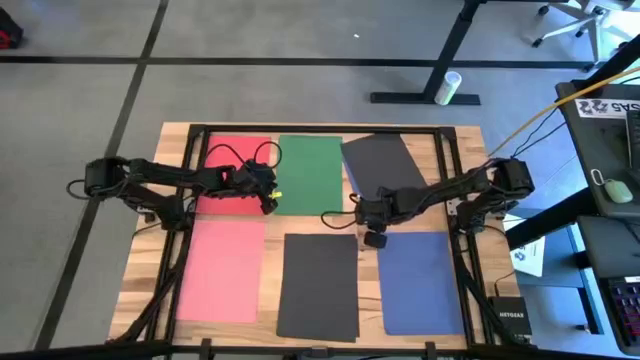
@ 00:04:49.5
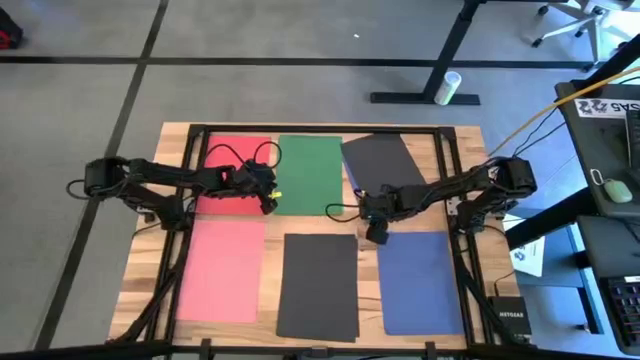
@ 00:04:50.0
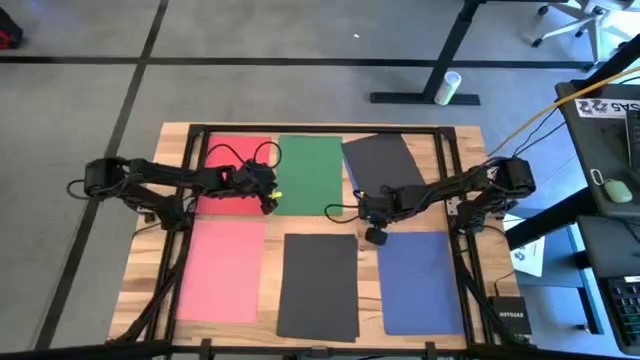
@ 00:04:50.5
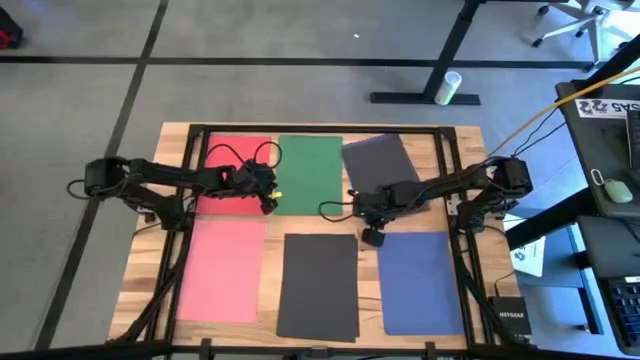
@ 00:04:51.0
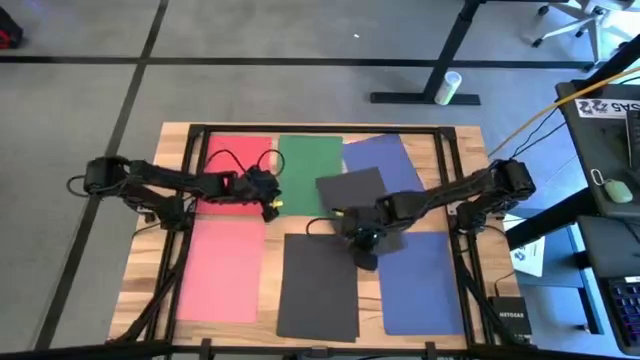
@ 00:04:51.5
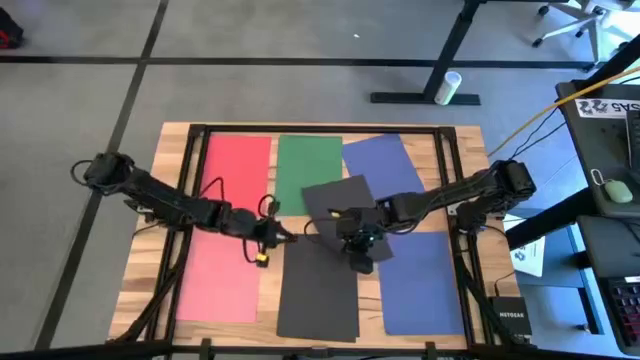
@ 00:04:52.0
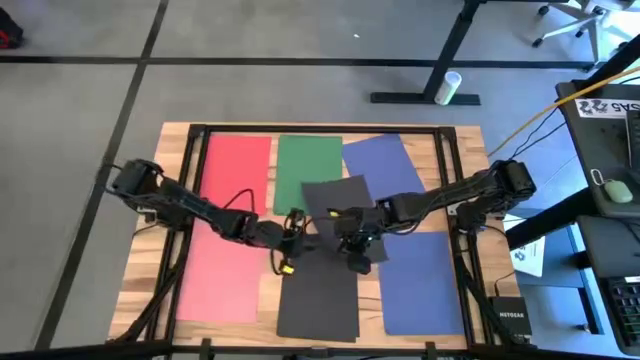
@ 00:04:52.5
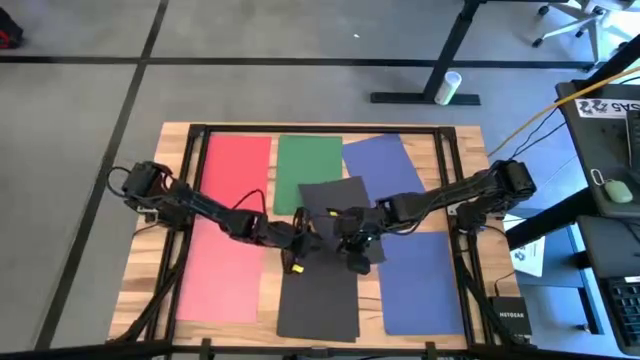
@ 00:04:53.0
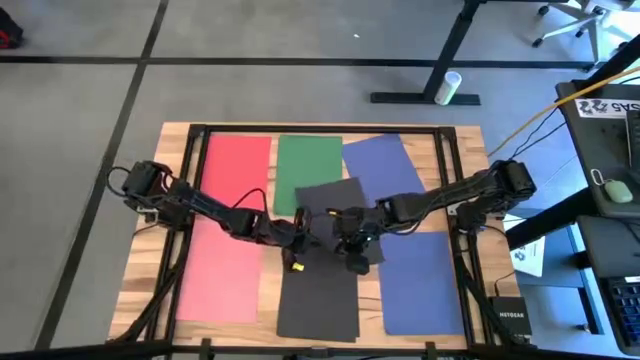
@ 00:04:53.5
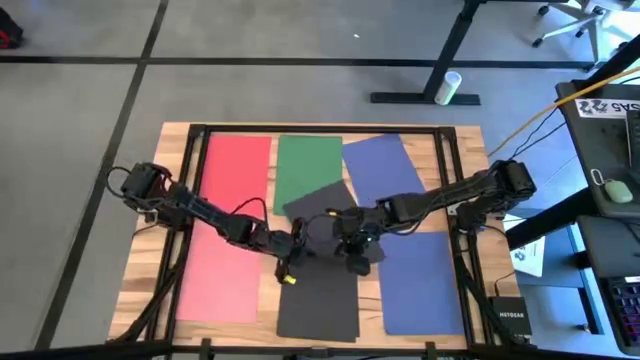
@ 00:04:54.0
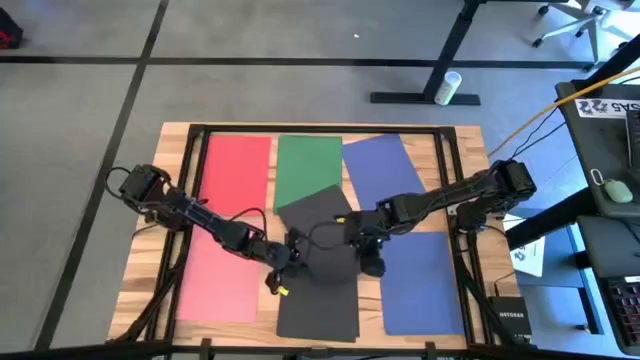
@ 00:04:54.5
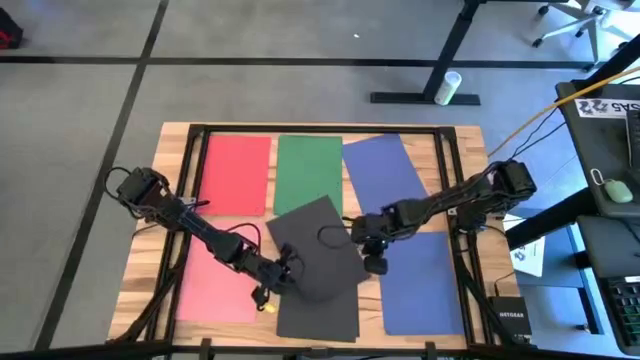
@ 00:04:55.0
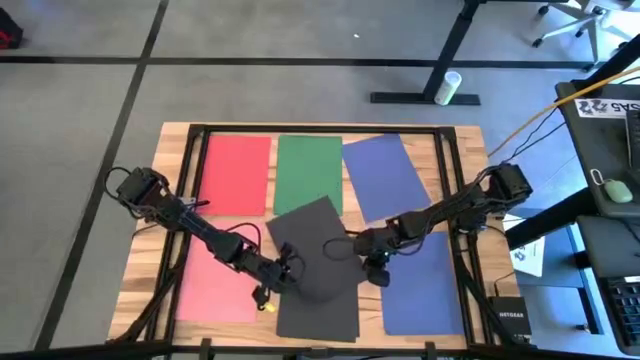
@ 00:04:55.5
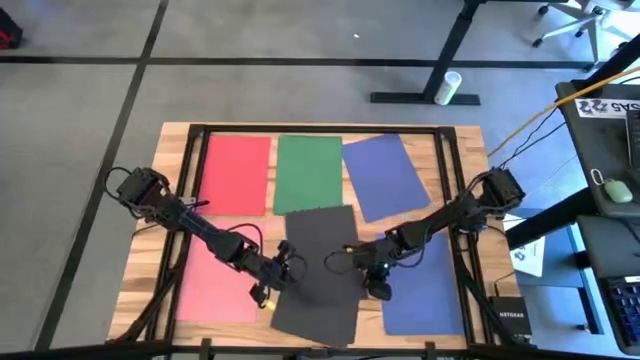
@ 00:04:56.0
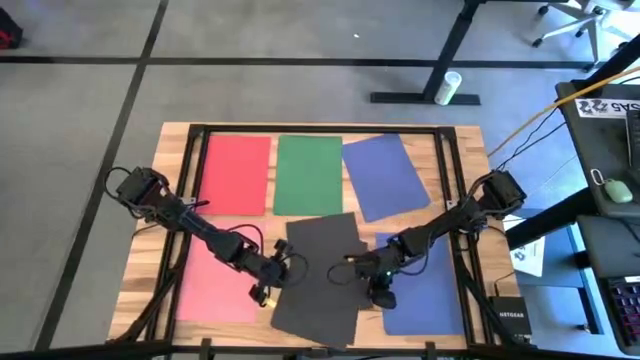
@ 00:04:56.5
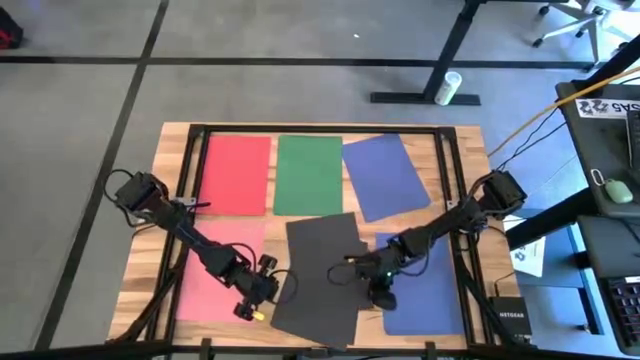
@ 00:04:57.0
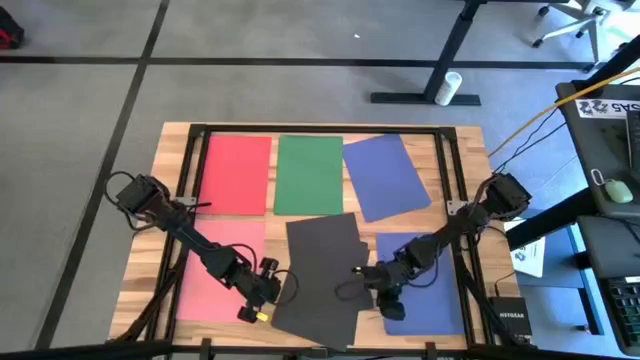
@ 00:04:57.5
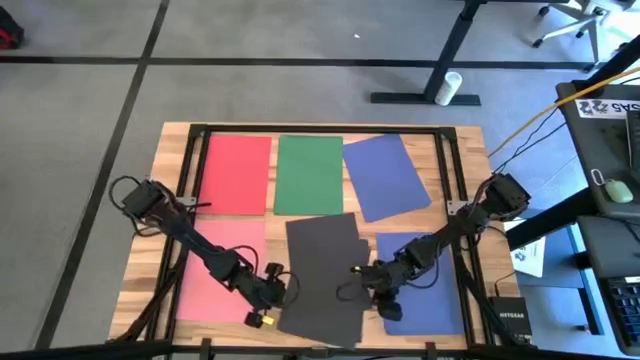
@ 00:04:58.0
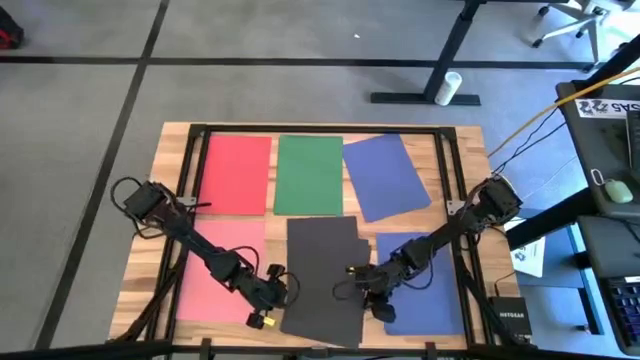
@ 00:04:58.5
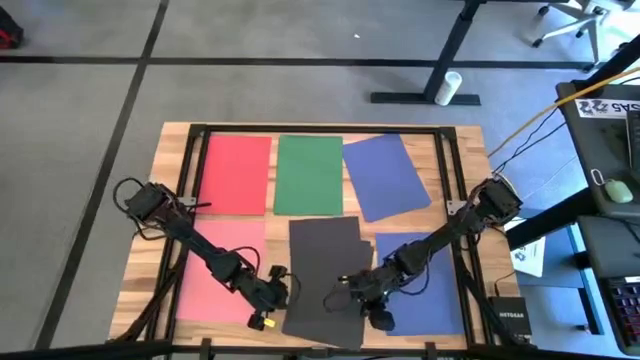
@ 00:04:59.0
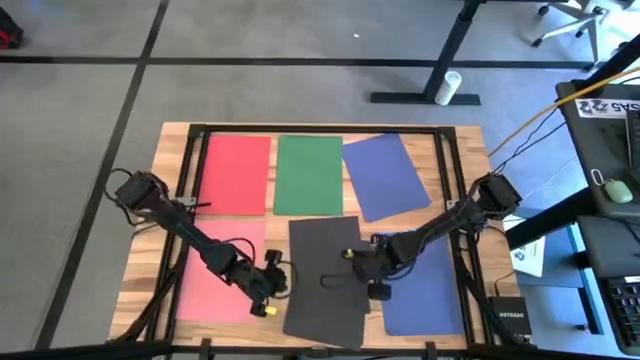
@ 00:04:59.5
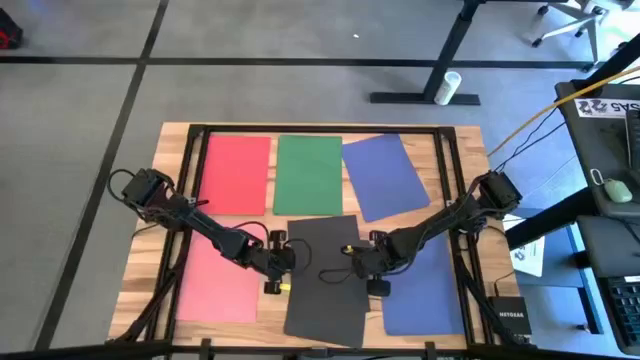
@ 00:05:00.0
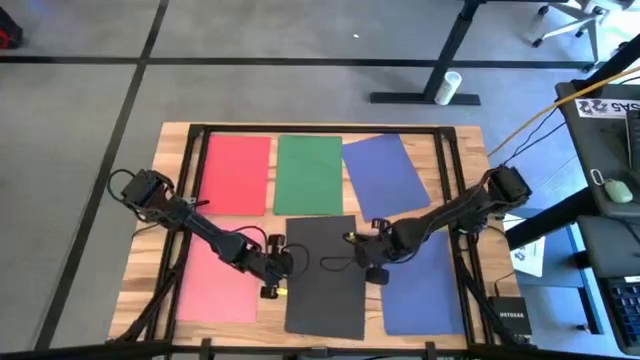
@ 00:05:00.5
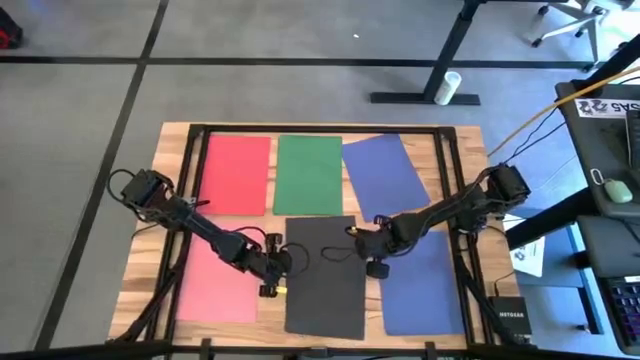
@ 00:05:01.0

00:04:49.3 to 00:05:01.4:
Task: Organize paper
Stack the black paper on top of the black papers

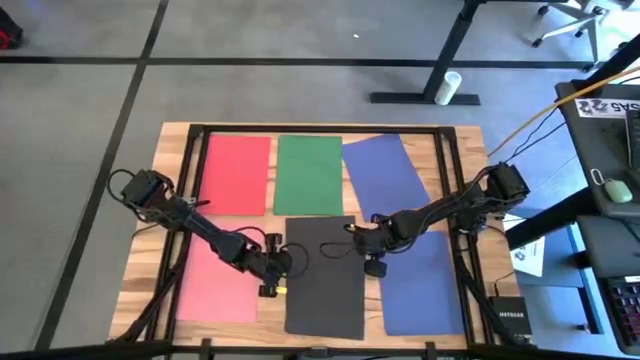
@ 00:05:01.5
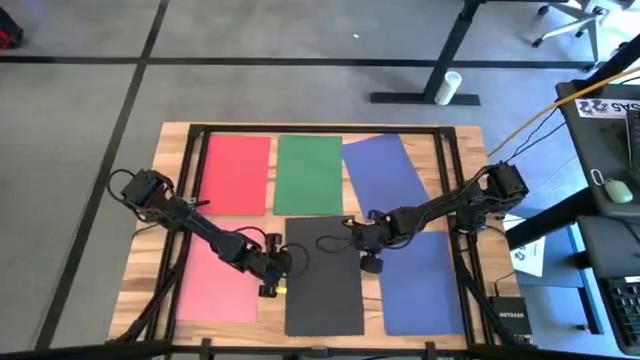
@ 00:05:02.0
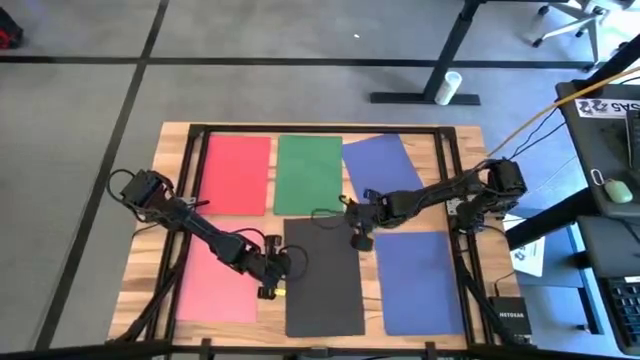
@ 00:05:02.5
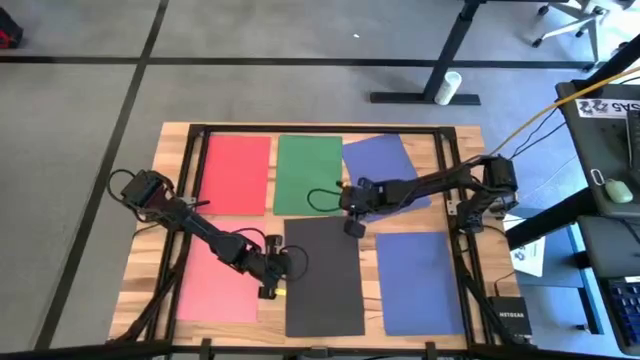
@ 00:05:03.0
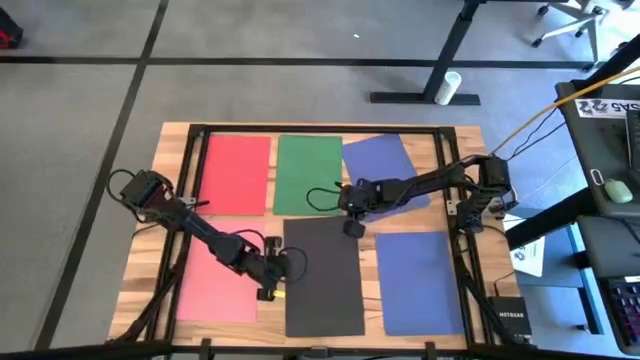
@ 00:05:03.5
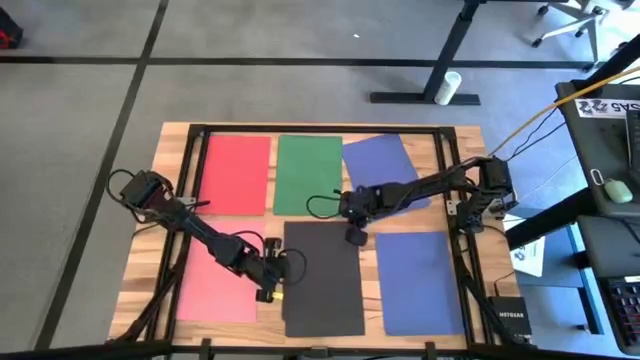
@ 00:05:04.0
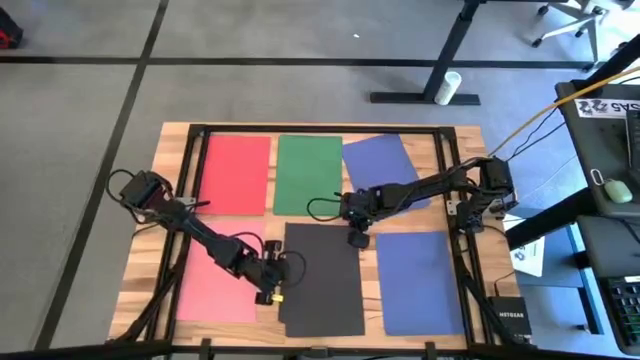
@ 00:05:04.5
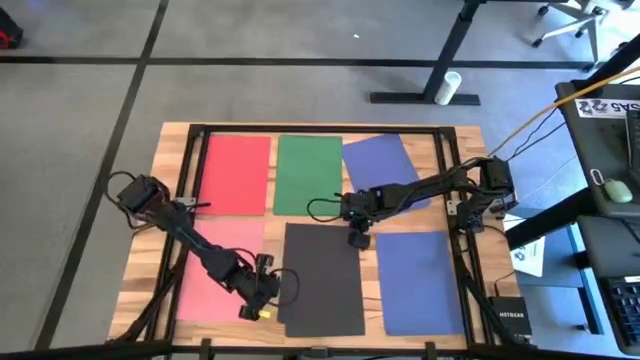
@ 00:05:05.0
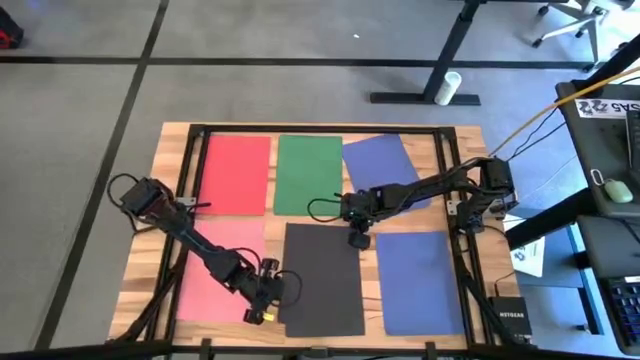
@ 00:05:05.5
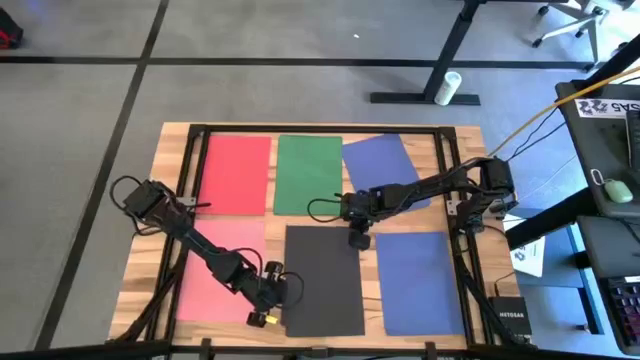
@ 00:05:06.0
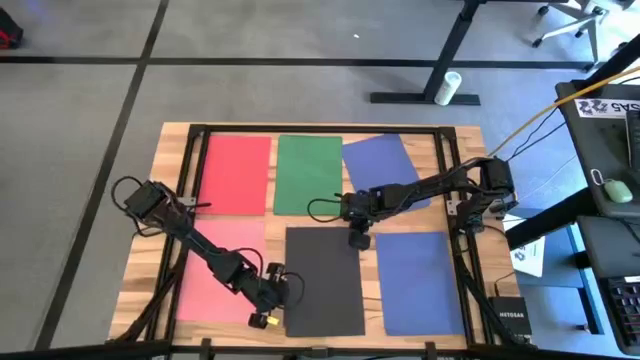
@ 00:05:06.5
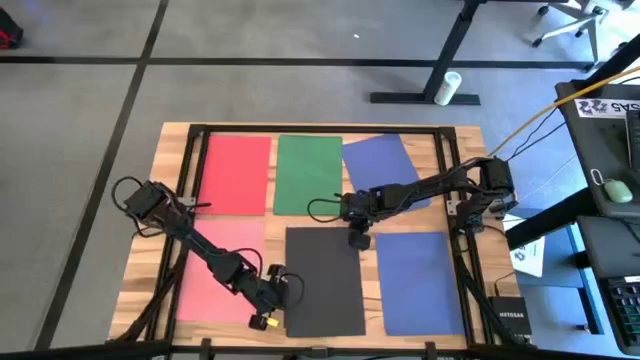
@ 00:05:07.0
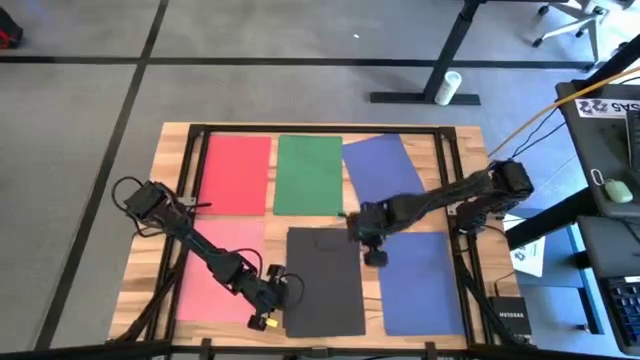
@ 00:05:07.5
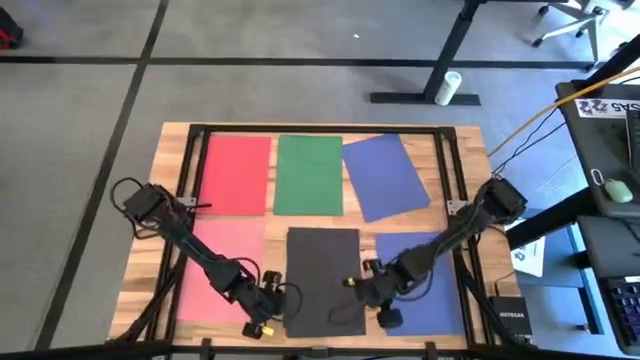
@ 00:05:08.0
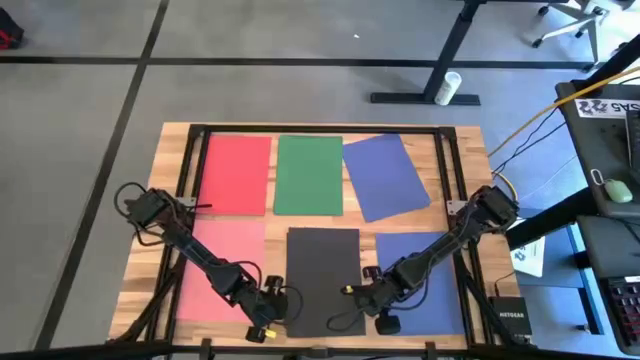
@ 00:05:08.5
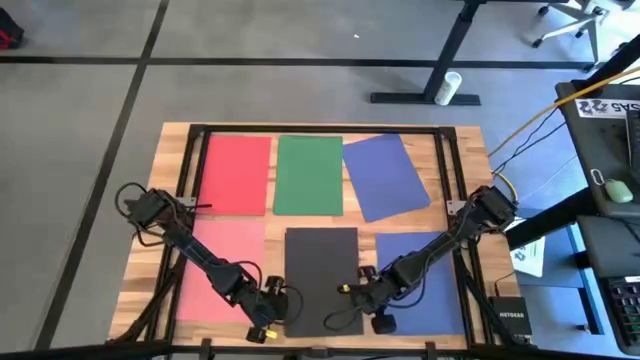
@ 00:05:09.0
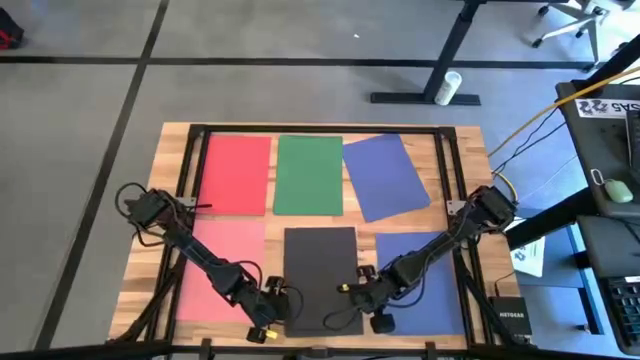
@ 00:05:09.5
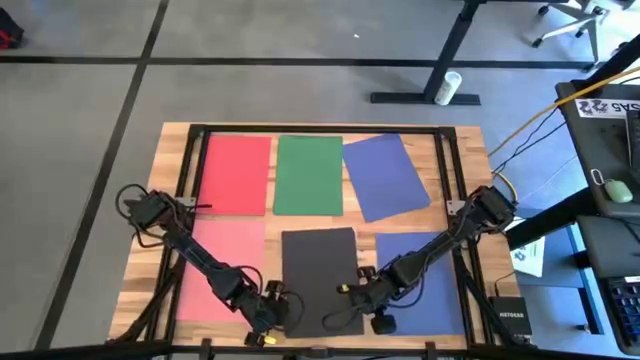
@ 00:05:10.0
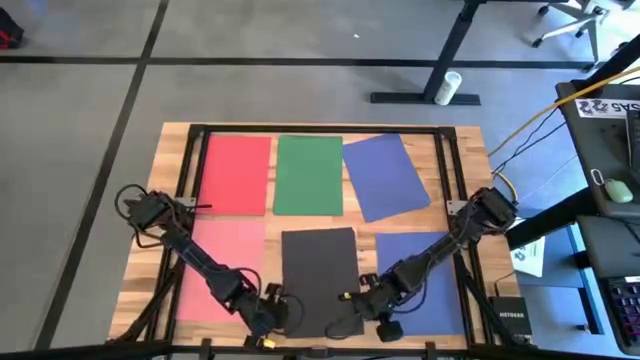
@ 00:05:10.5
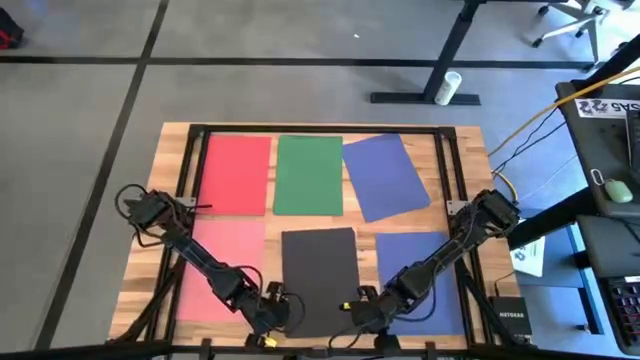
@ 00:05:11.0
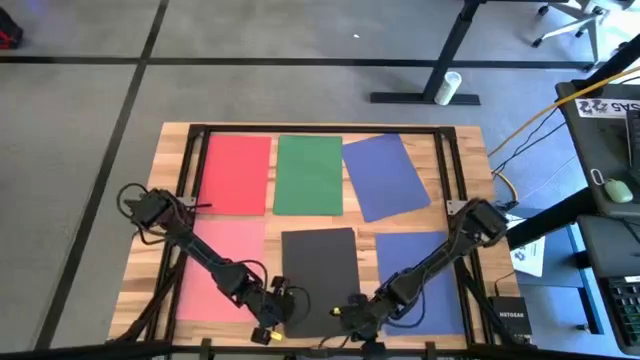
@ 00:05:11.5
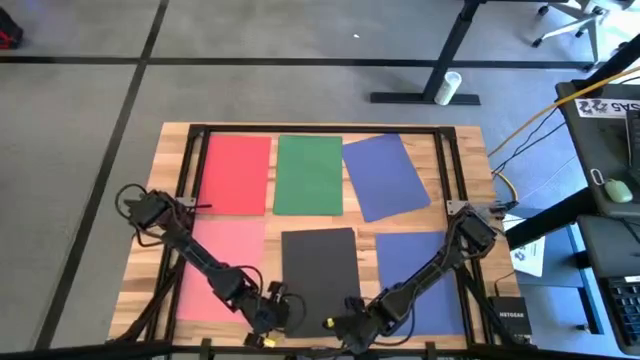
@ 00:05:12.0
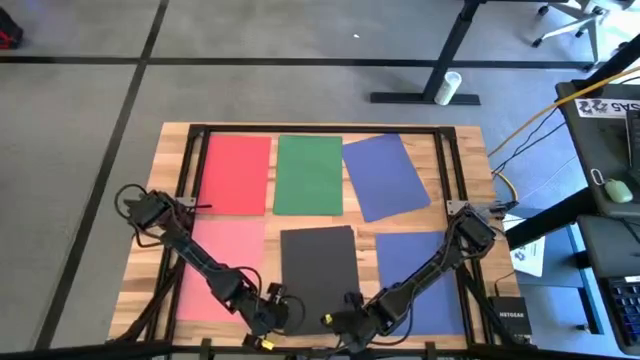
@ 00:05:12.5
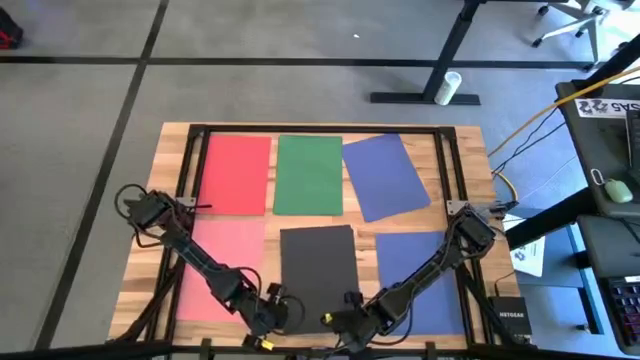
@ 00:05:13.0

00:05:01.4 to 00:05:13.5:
Stack the black paper on top of the black papers
